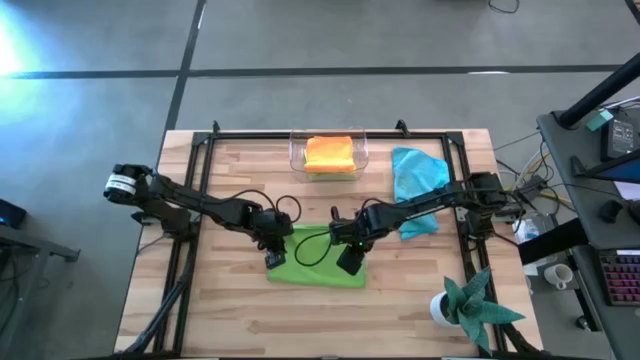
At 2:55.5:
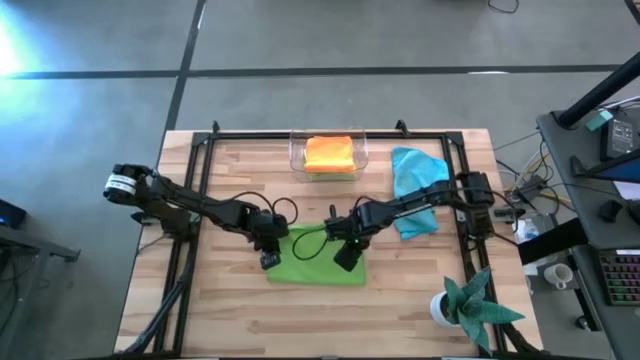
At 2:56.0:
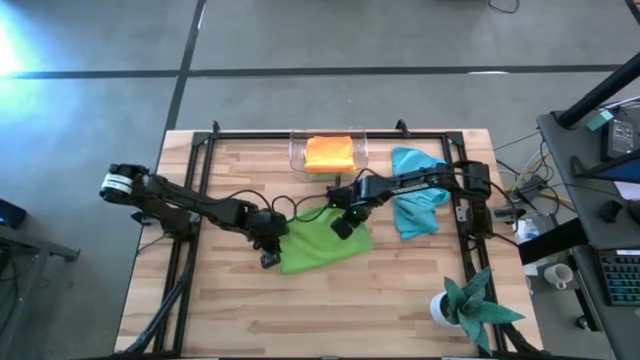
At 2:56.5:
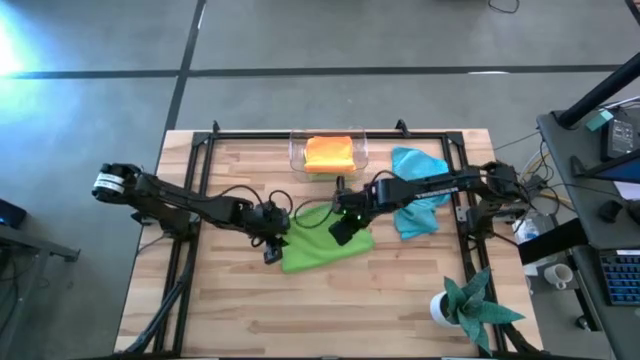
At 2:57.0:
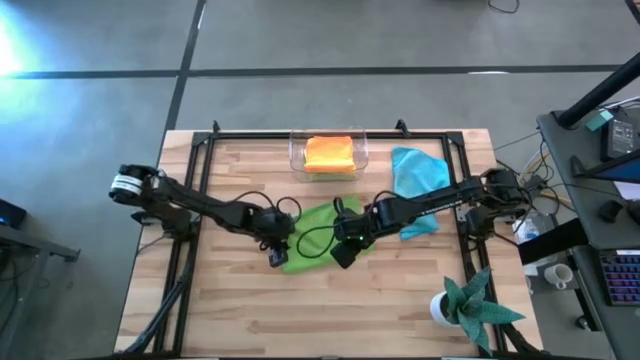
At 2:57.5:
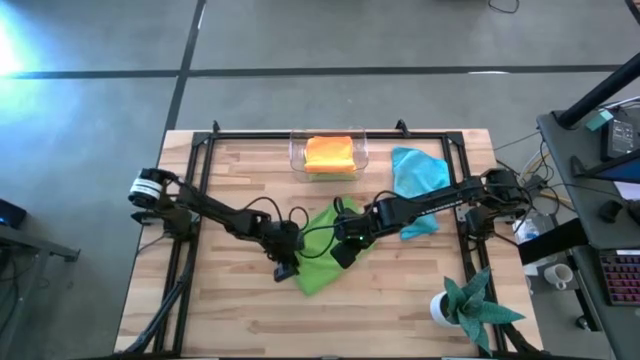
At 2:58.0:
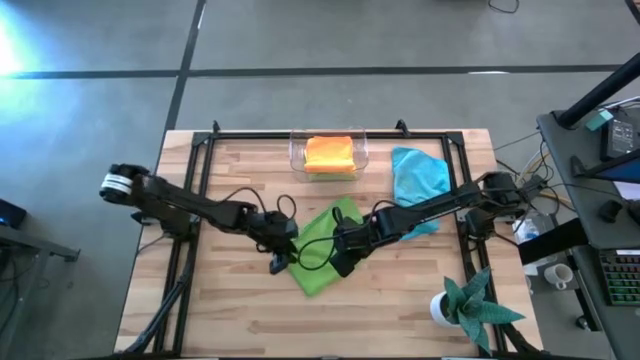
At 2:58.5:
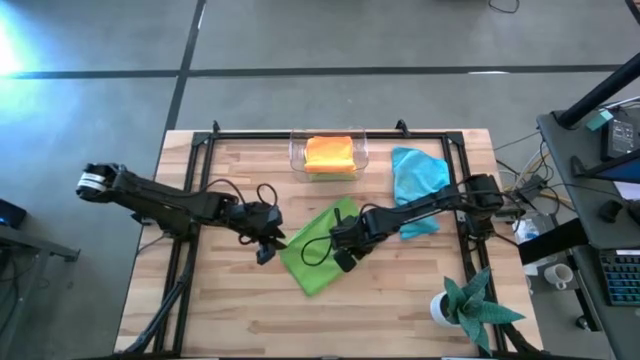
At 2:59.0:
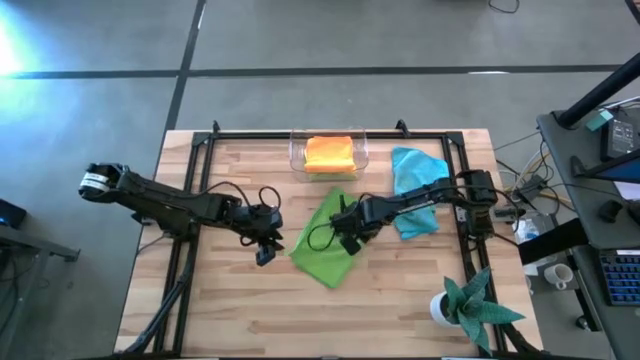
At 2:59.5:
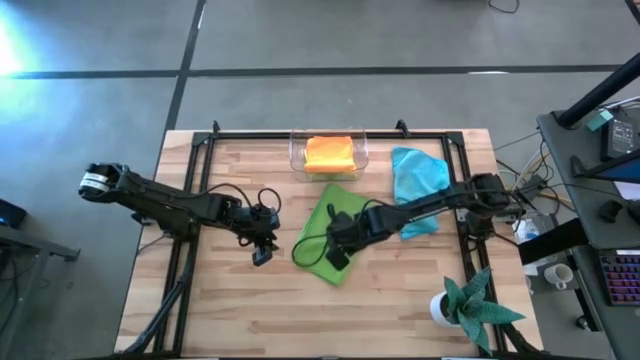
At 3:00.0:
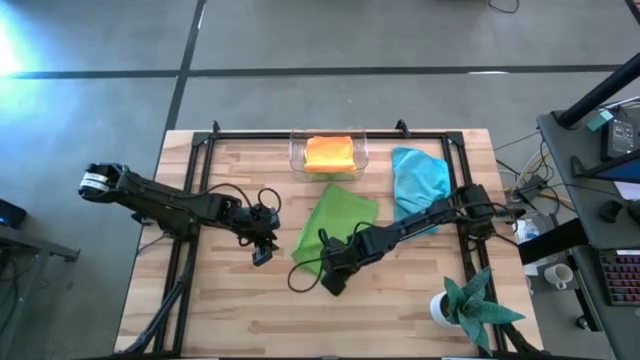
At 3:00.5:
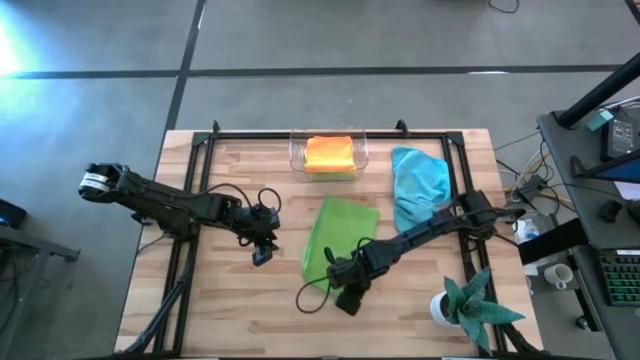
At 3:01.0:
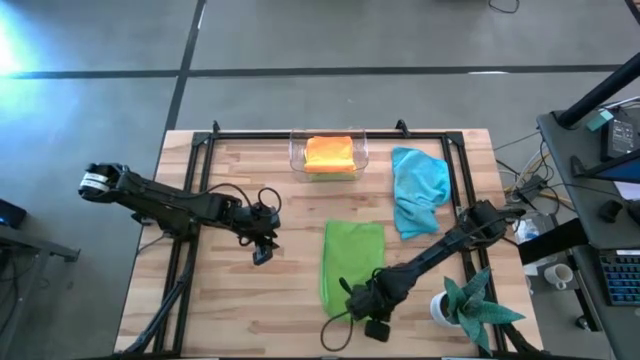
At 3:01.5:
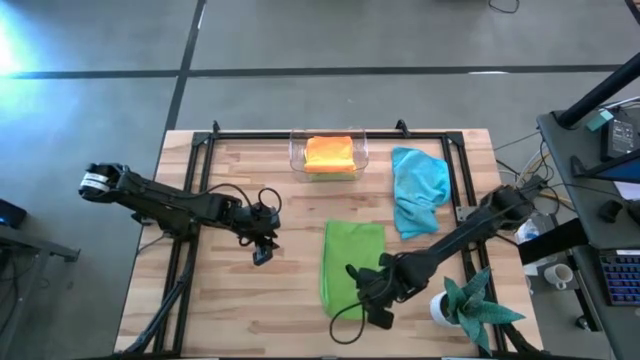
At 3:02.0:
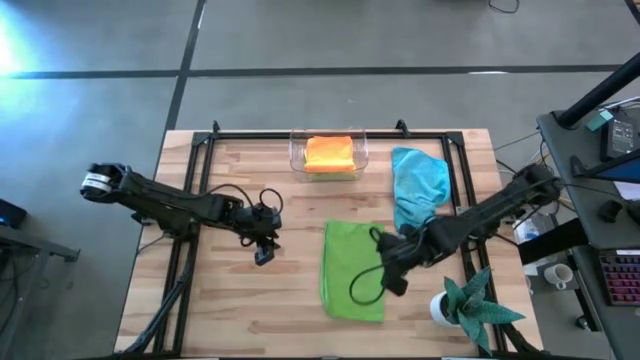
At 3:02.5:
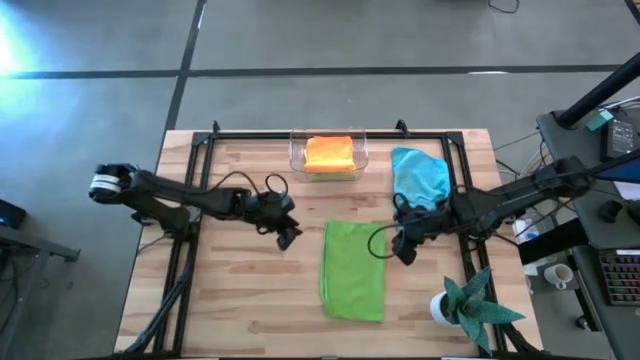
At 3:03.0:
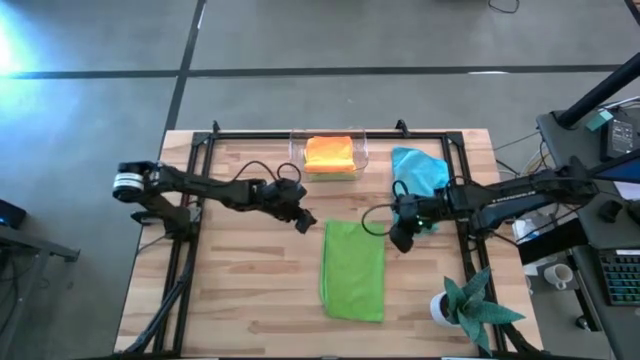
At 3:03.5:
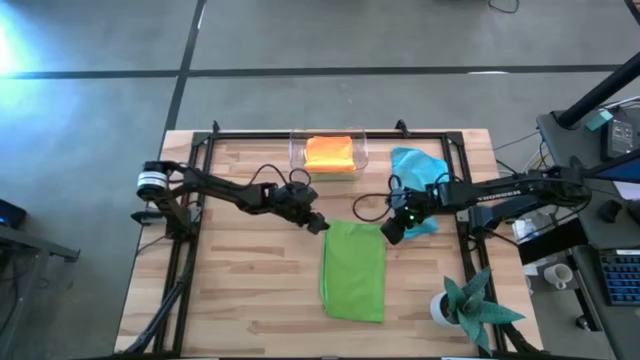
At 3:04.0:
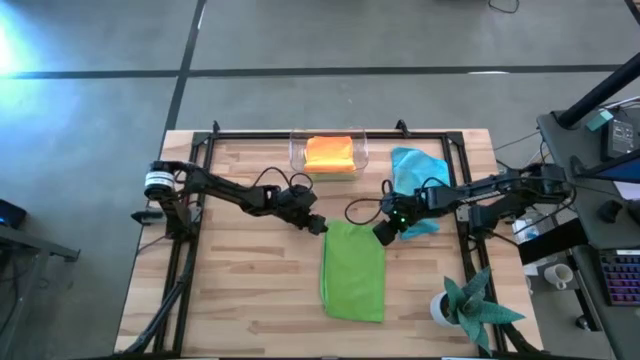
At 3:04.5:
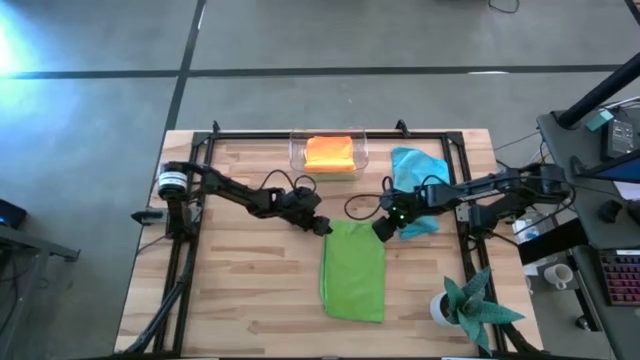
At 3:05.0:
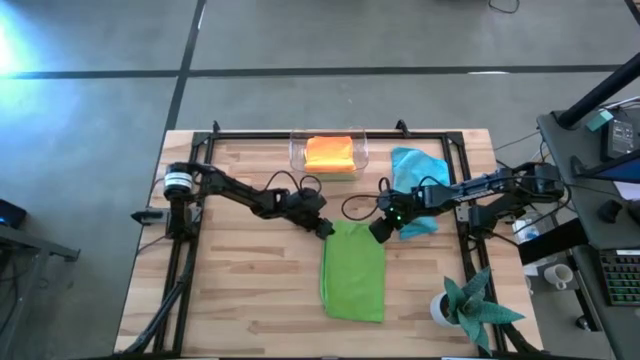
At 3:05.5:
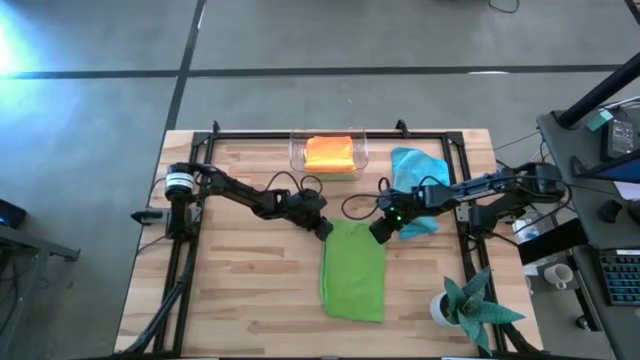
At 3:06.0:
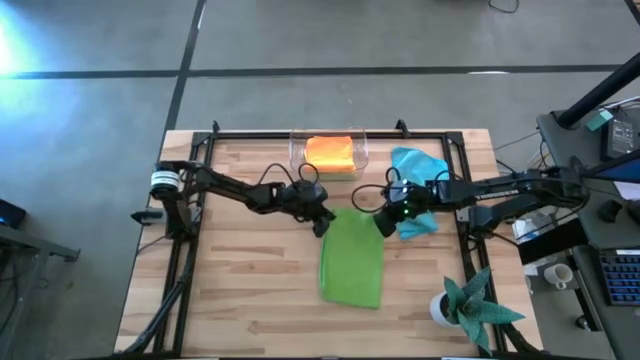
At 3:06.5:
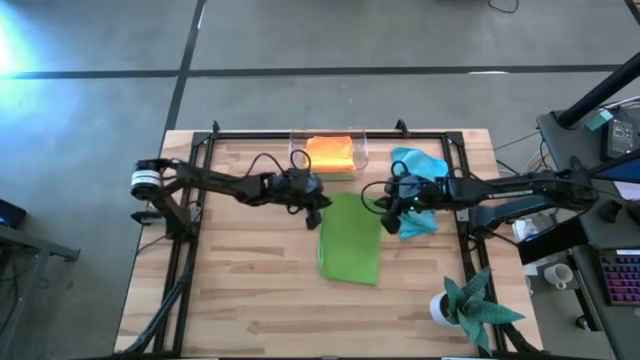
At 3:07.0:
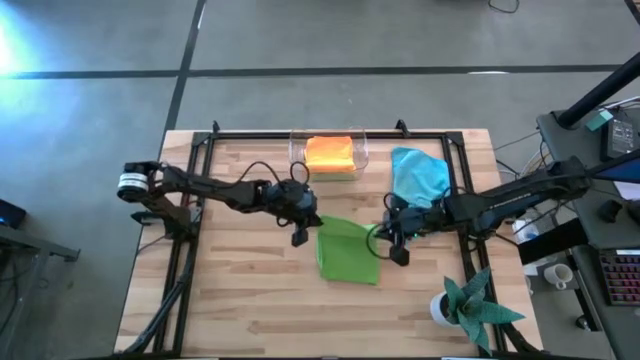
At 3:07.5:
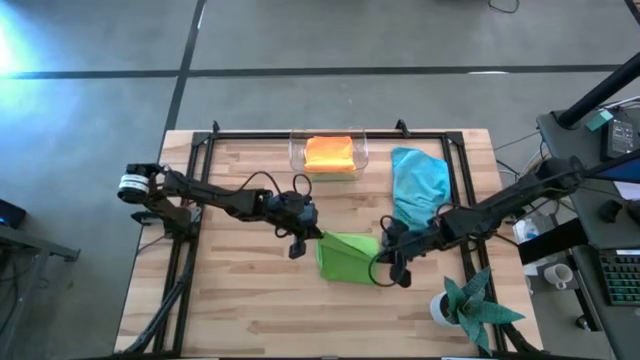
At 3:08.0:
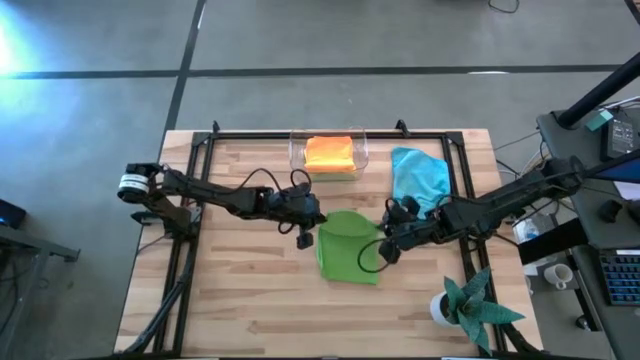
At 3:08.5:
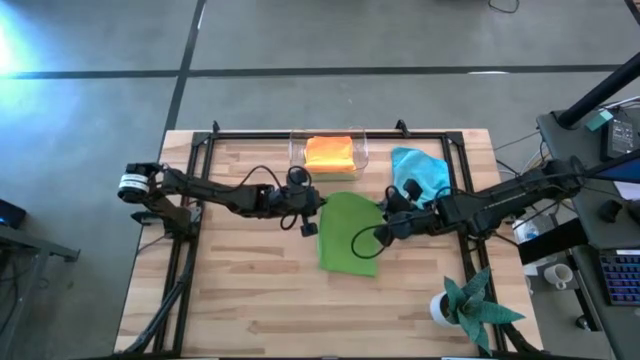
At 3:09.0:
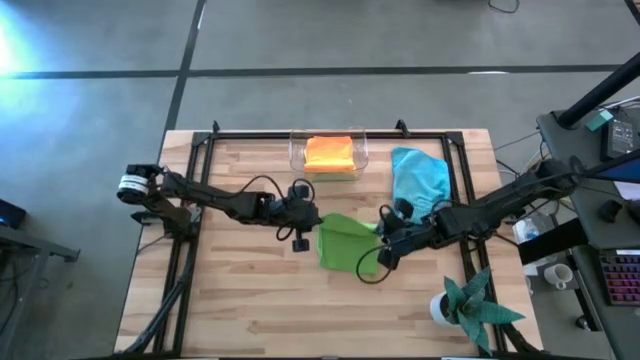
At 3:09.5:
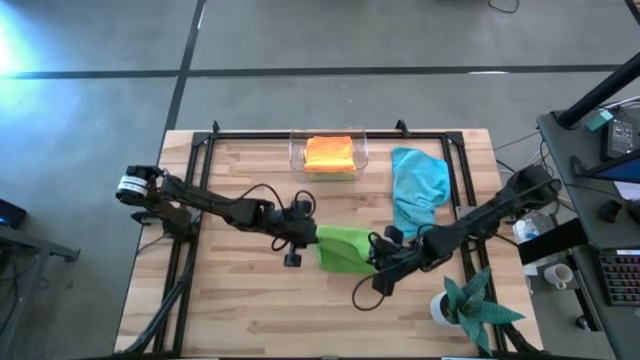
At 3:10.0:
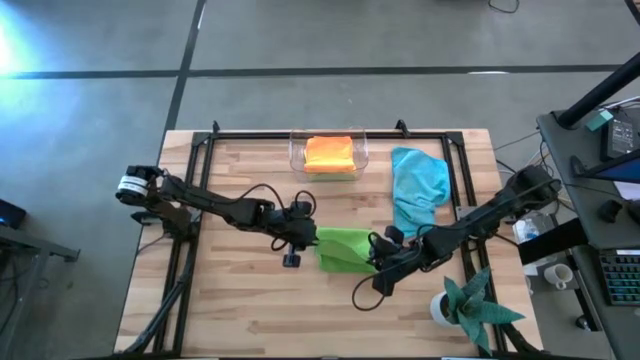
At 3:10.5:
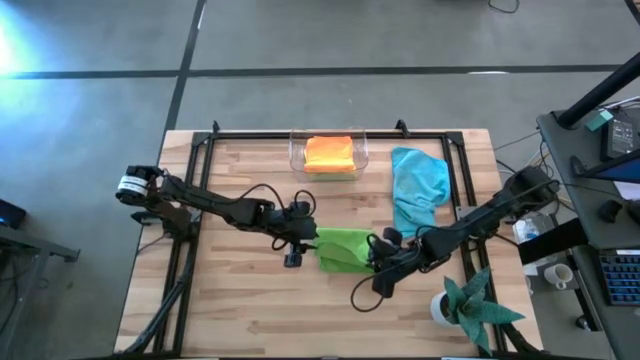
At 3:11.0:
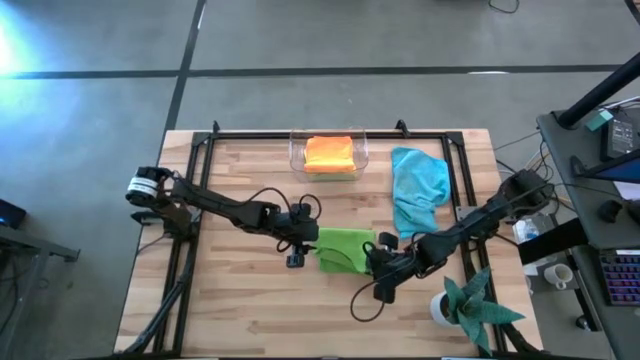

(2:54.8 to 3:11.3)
Task: Fold microfiber towels
Fold the green microfiber towel

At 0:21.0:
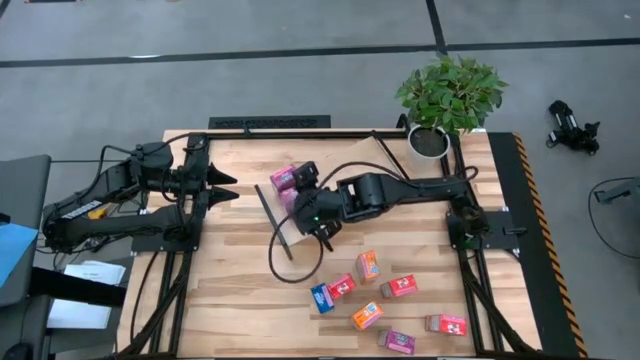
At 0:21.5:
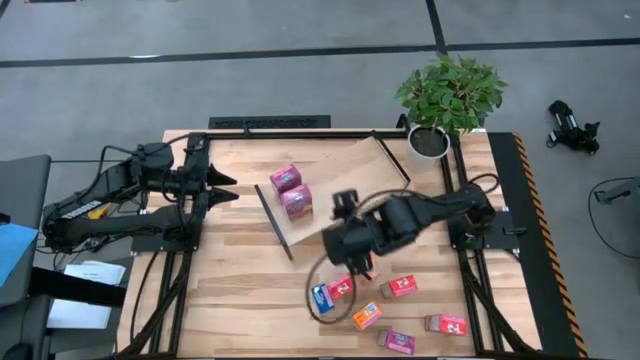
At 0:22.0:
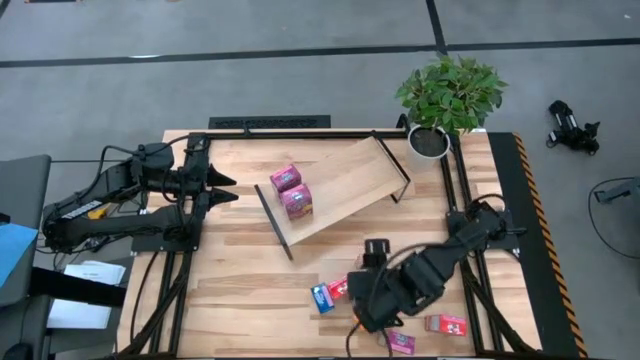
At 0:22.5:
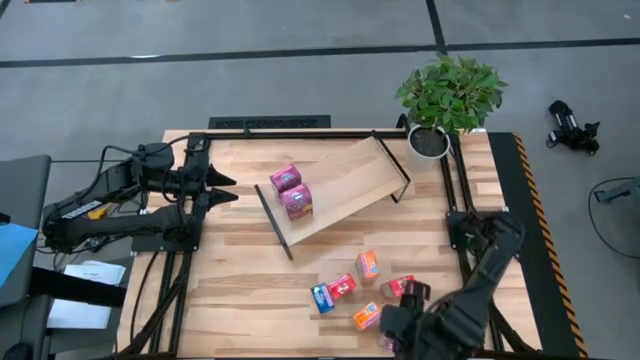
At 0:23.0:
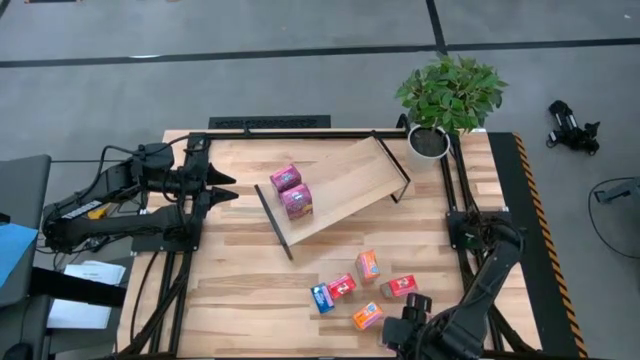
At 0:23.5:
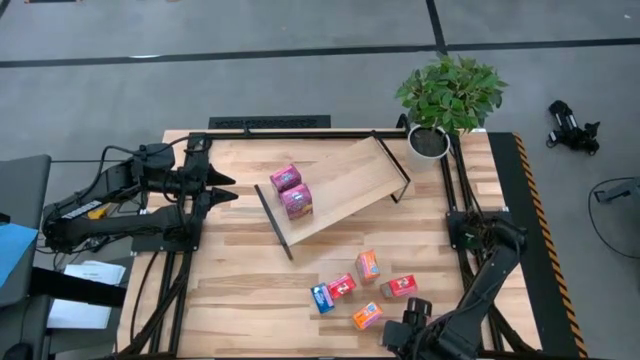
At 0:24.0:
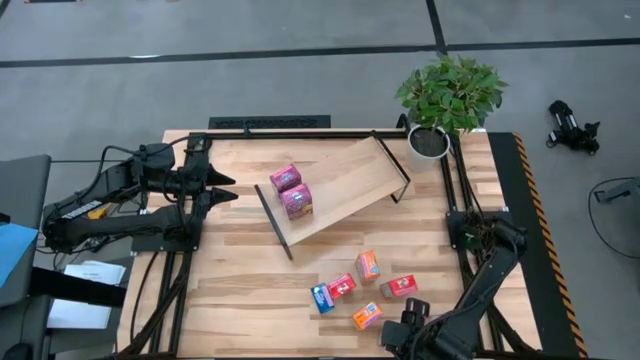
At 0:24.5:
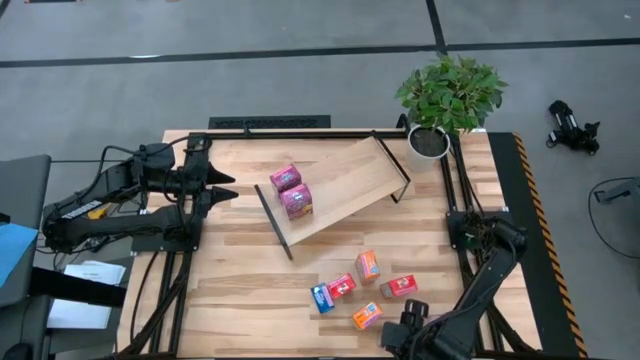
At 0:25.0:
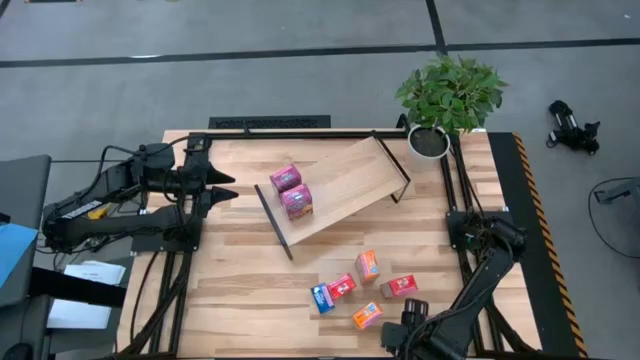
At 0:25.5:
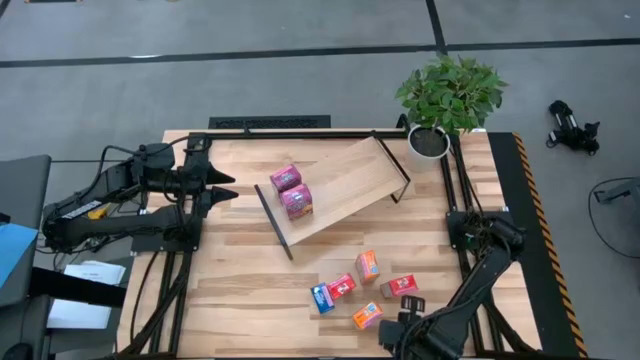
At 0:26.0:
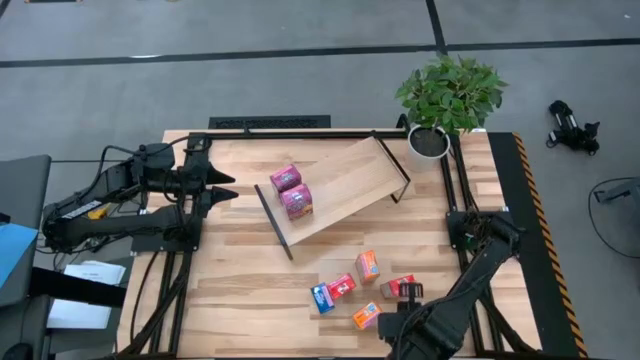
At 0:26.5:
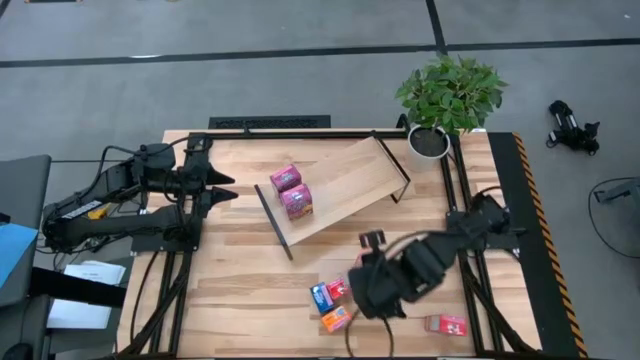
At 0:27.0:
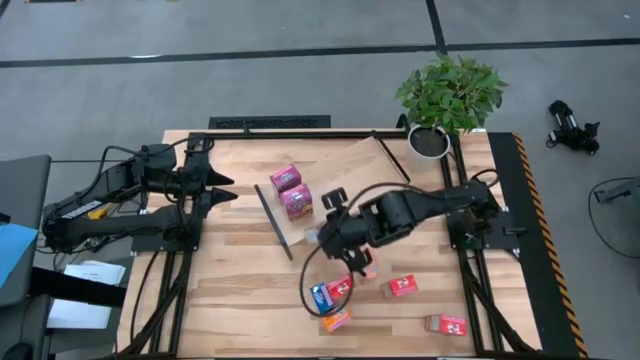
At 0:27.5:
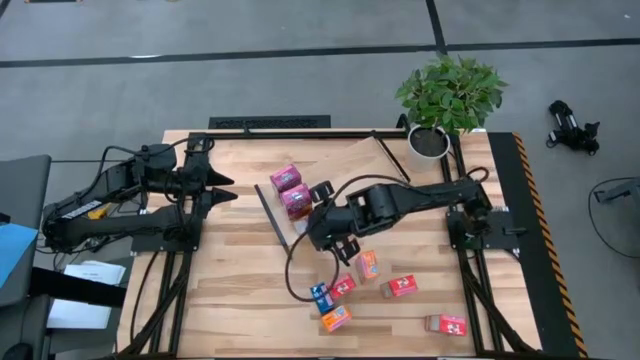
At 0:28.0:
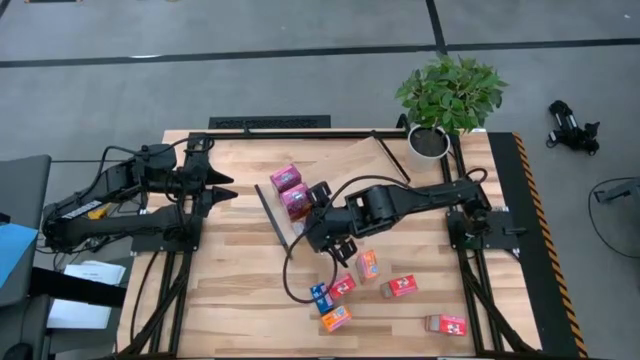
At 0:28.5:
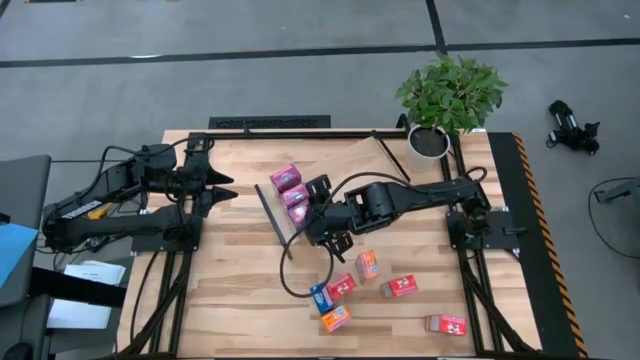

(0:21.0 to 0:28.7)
Task: Stack cereal on shelf
Put the purple cereal box aligned with the other other purple cereal boxes on the shelf
